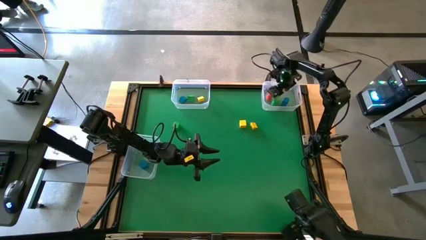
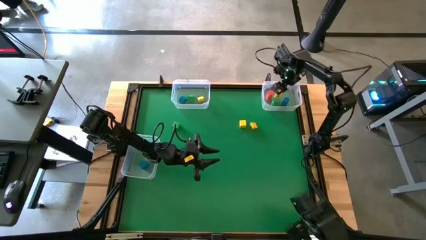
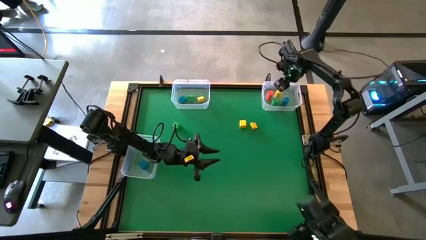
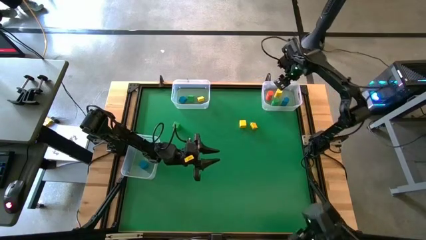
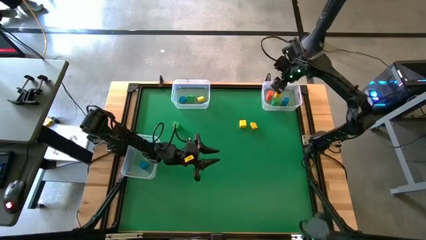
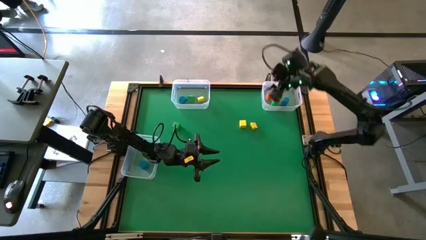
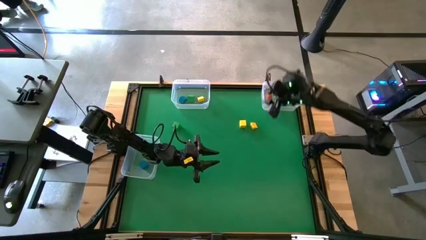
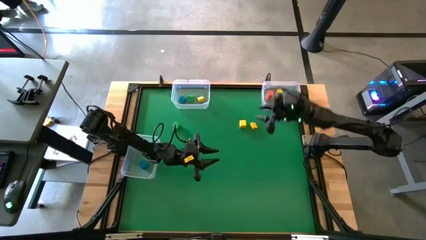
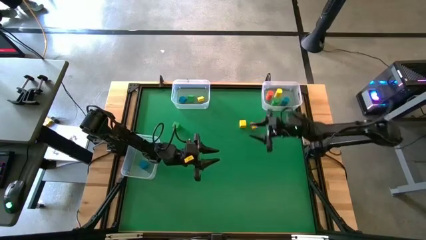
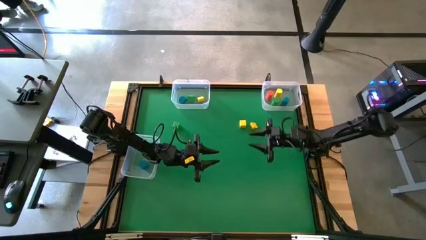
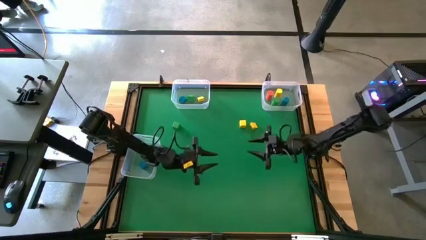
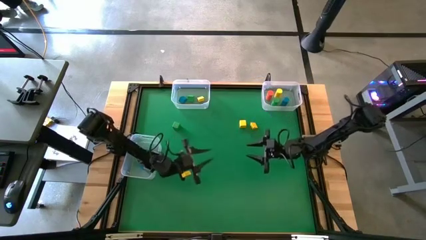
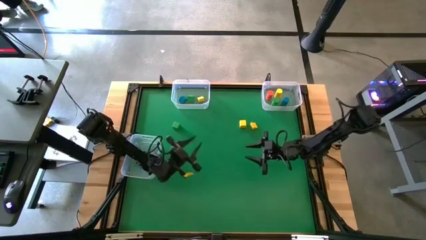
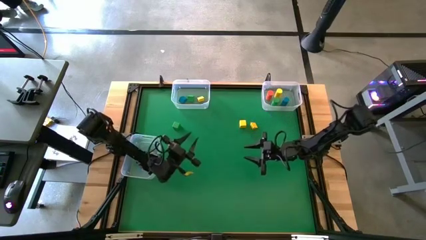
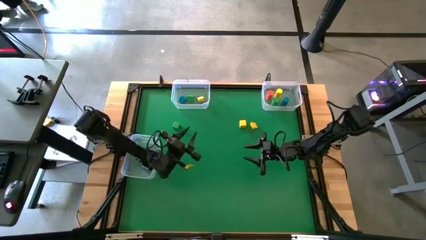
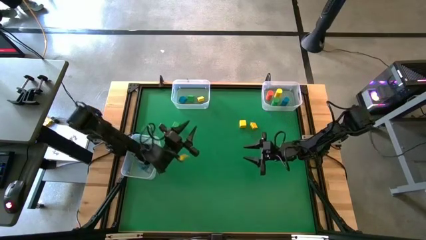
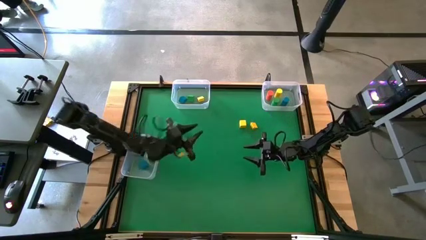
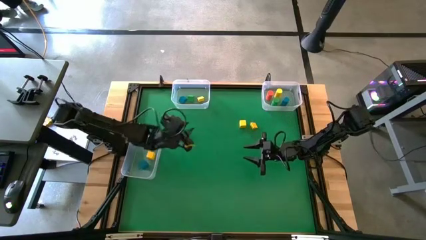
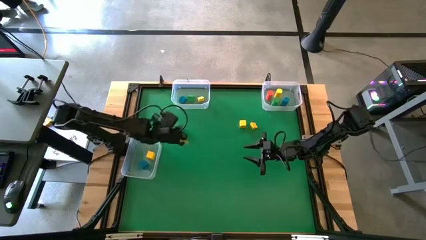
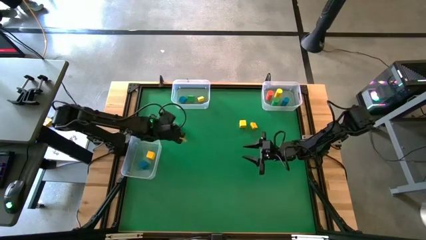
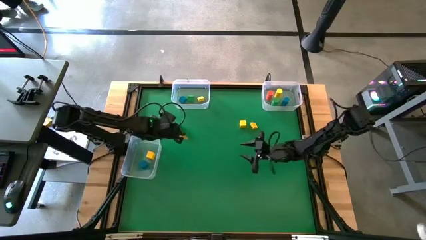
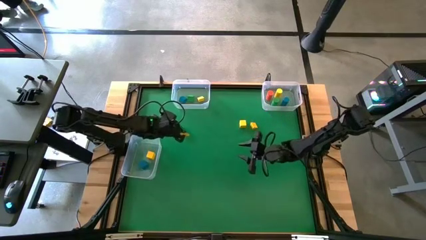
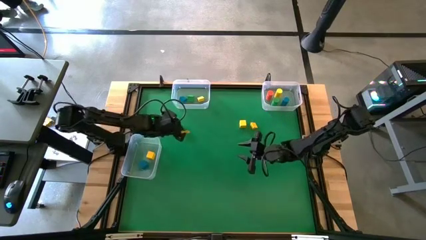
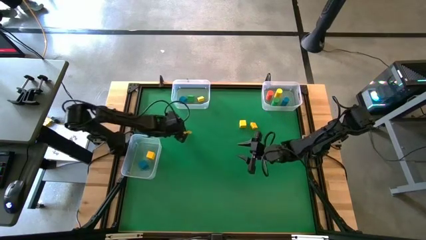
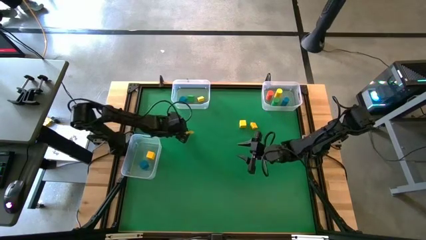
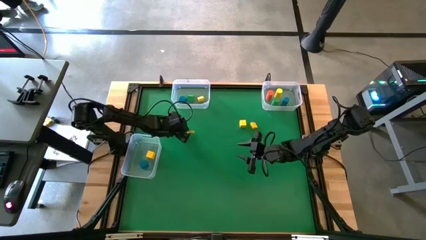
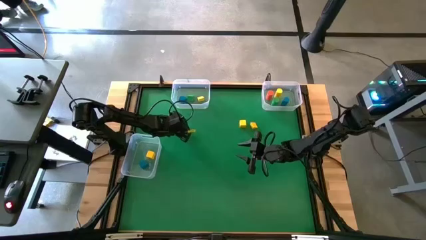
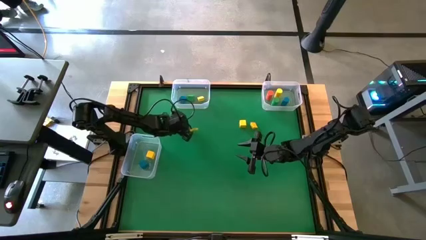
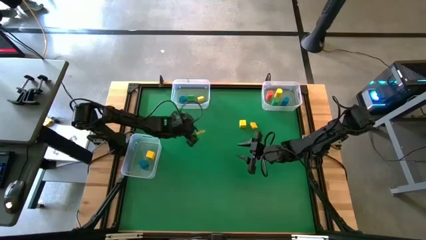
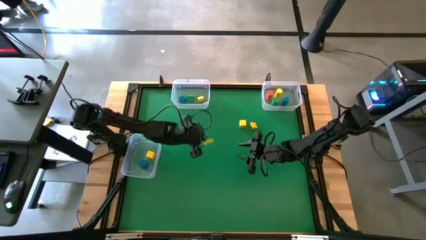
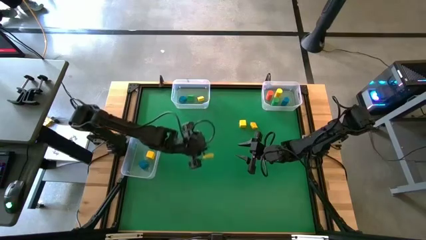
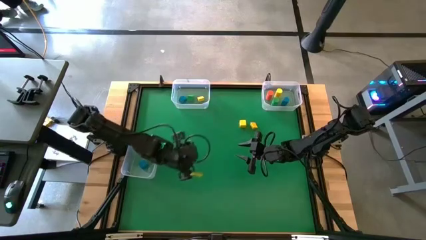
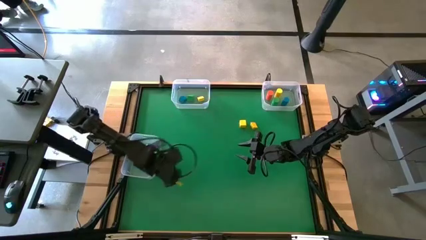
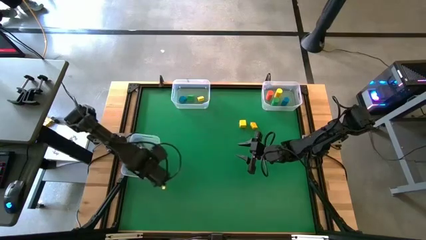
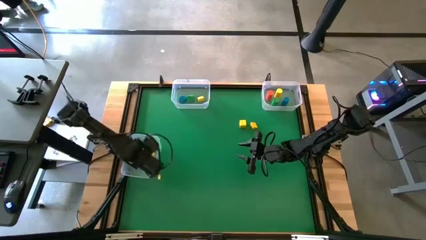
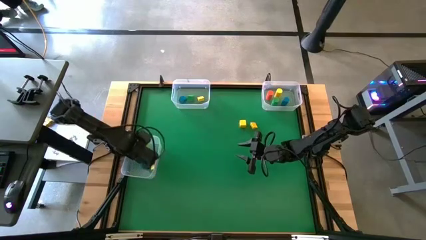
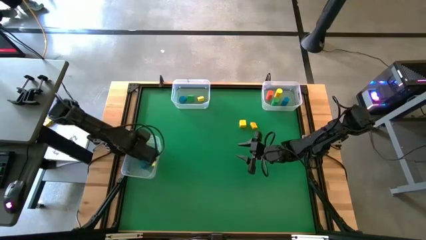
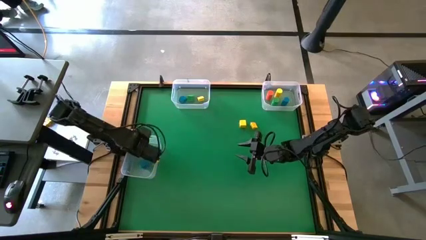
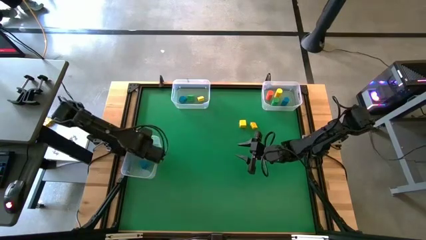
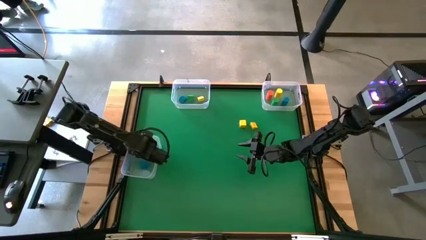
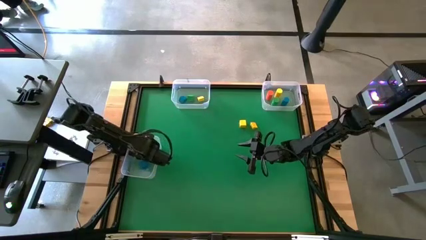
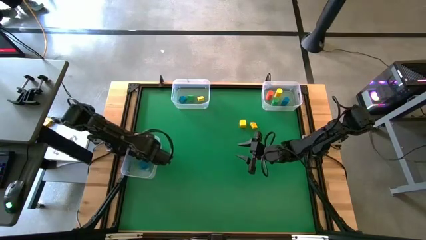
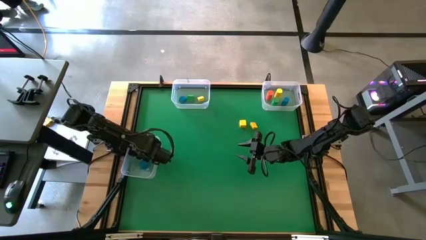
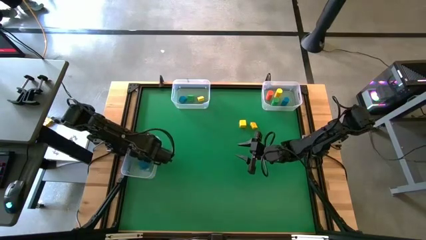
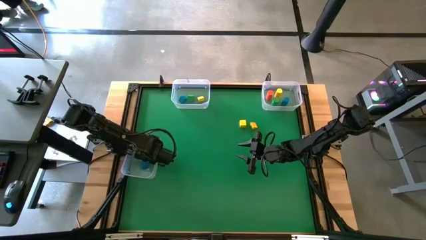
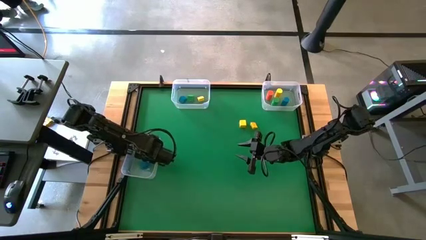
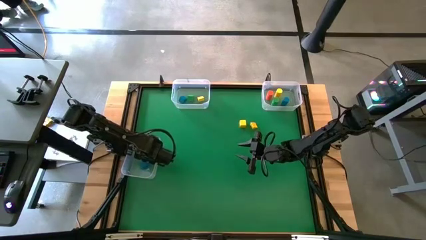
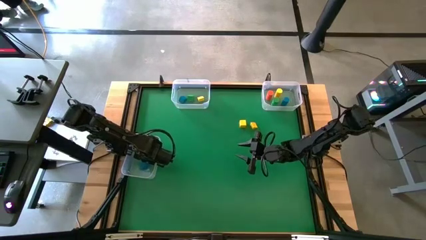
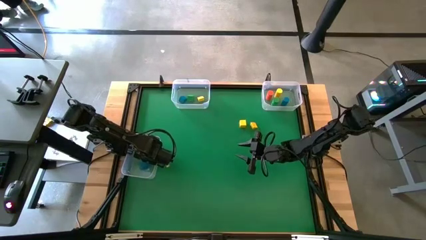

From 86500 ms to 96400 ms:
Task: Sort blocks by size
Put the green square block into the bottom transparent bin

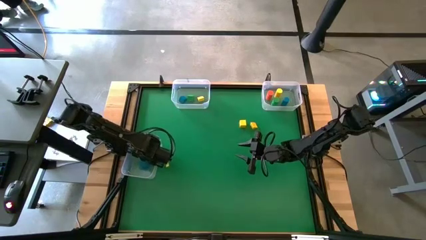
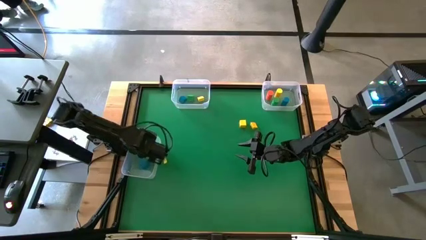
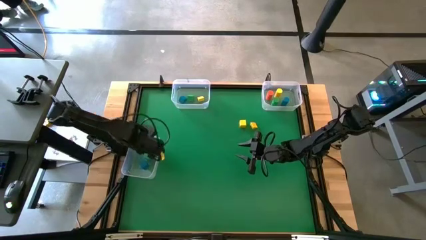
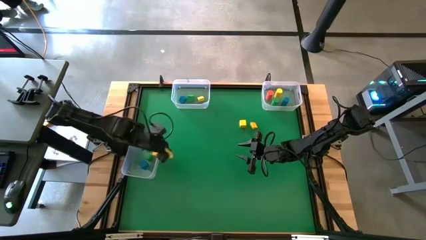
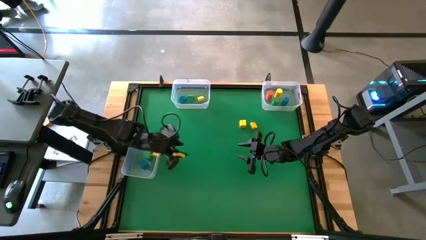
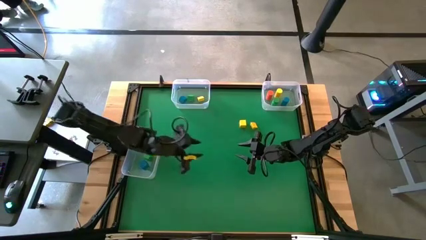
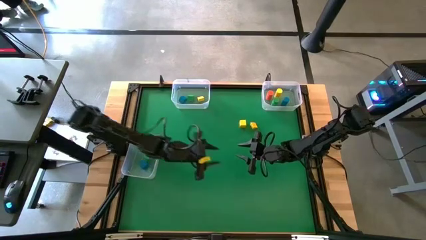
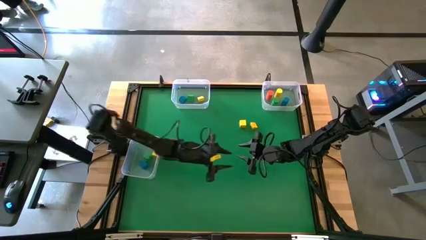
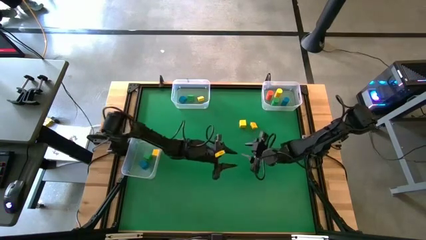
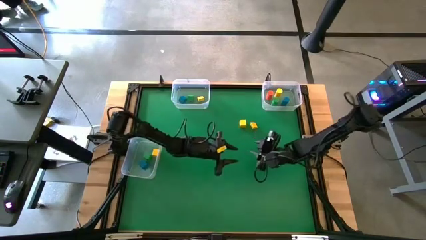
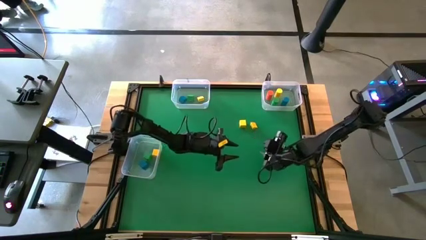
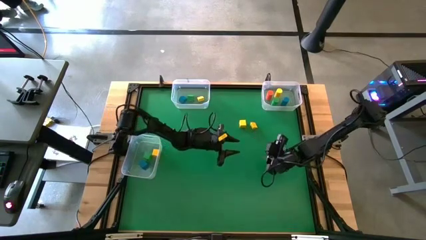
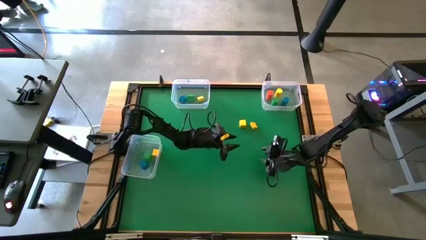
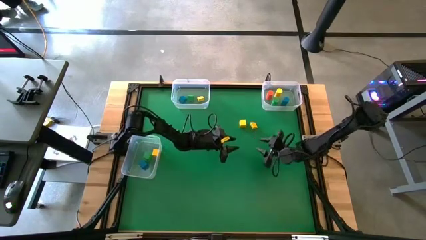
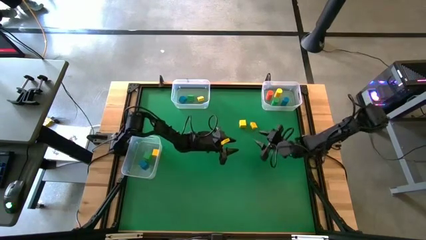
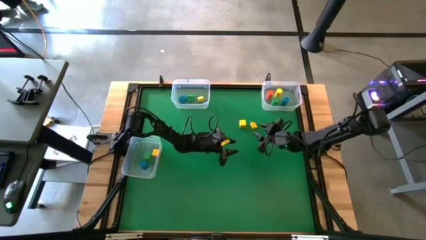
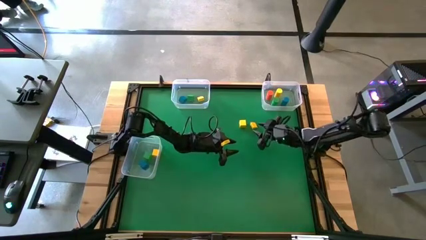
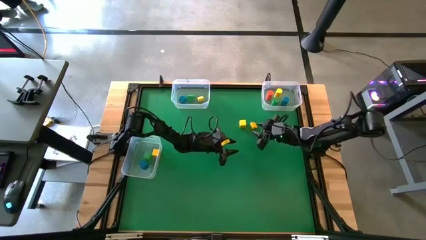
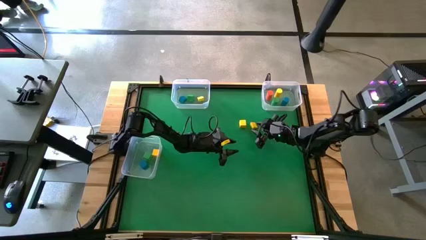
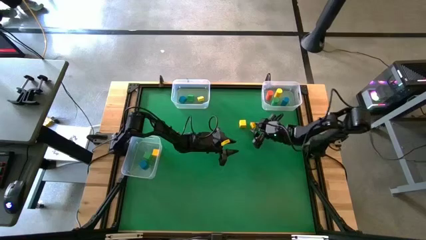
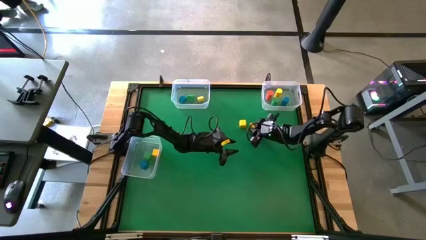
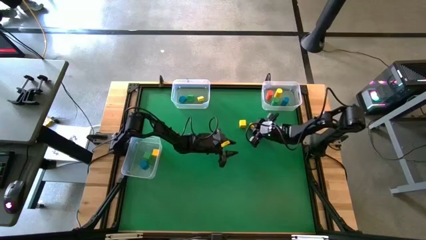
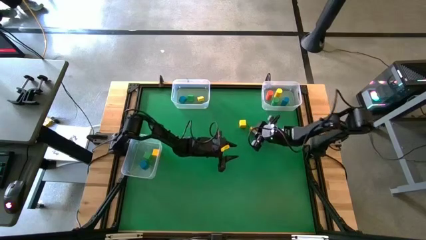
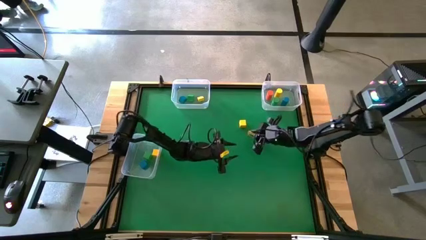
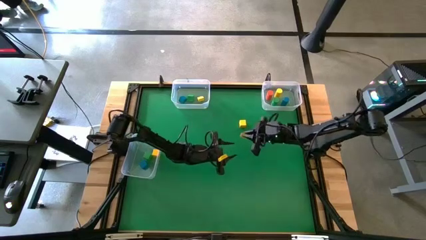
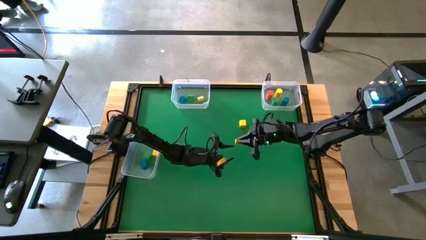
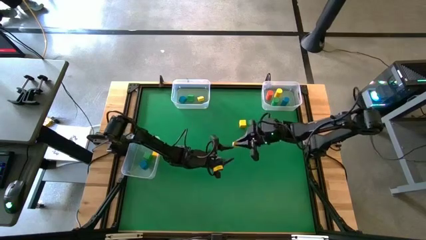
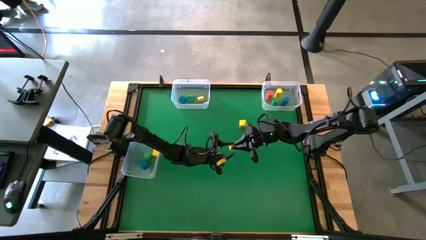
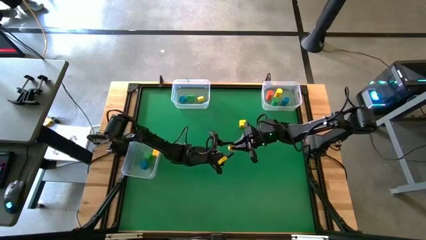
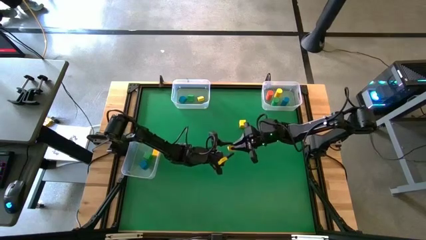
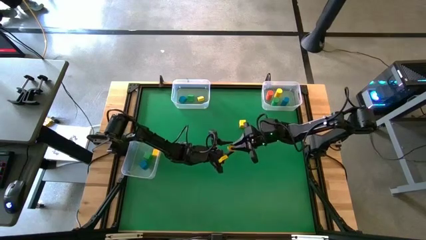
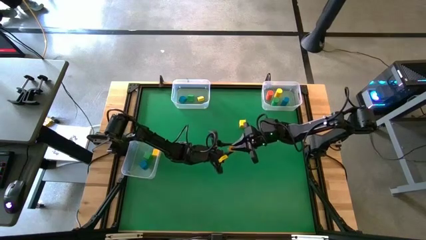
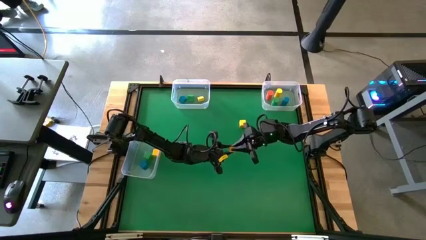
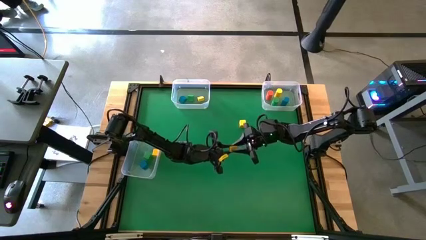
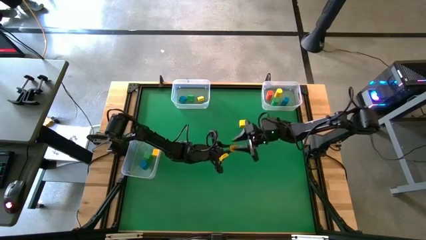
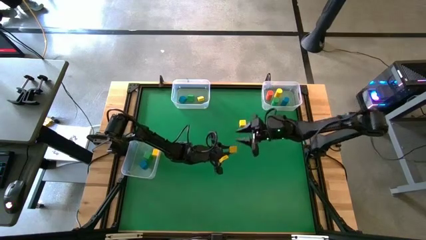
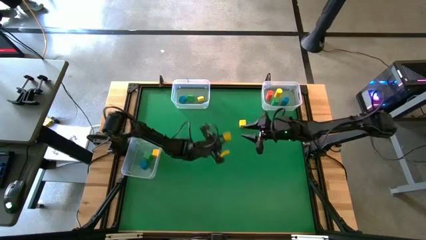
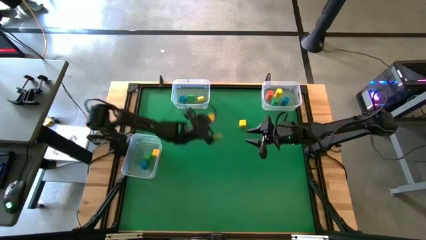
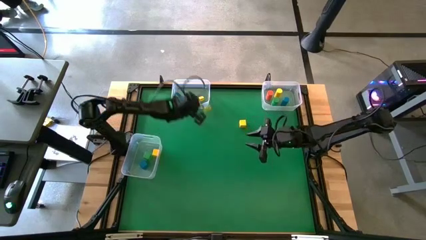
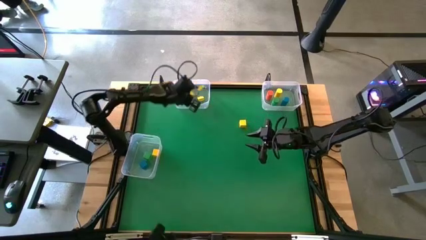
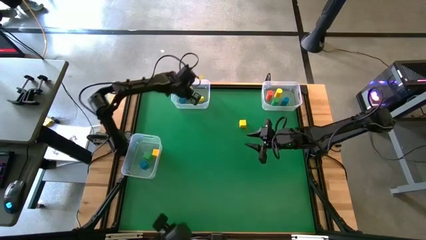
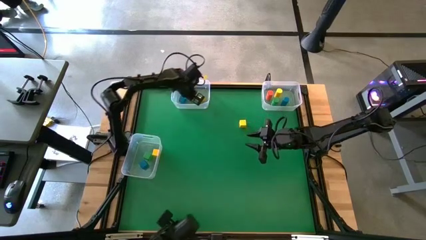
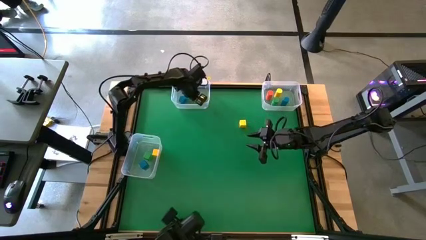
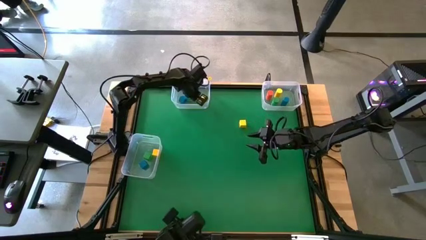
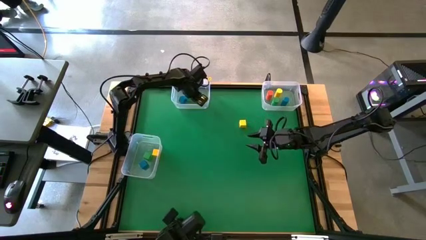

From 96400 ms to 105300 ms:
Put the yellow triangle block into the top left transparent bin
